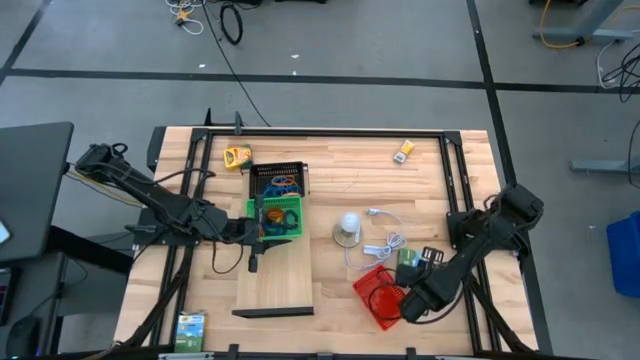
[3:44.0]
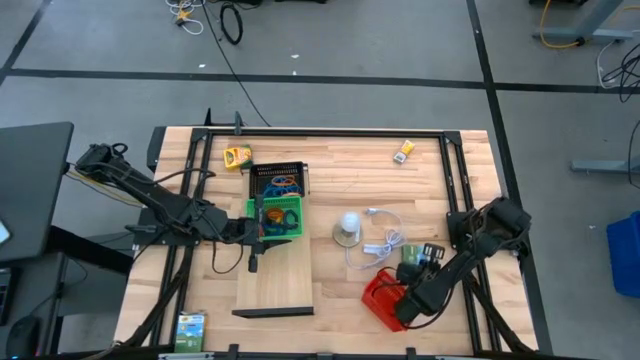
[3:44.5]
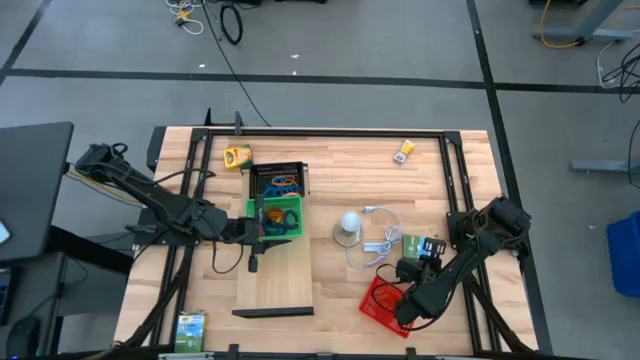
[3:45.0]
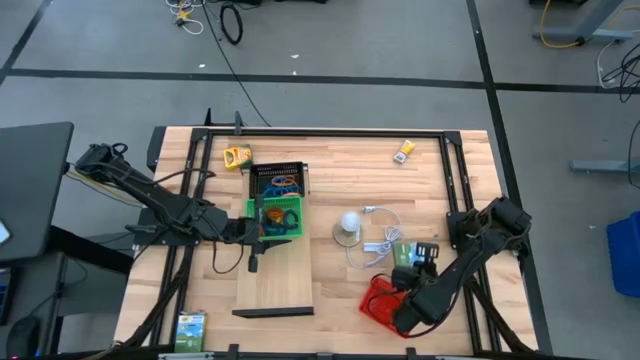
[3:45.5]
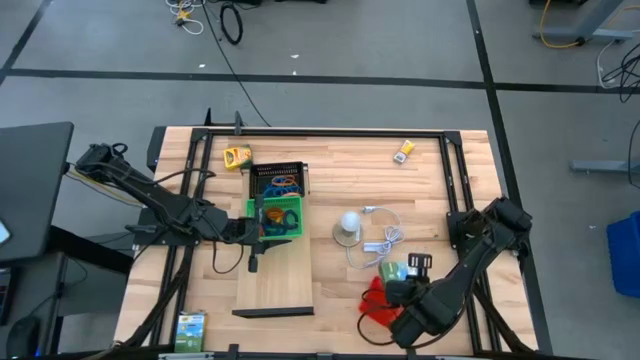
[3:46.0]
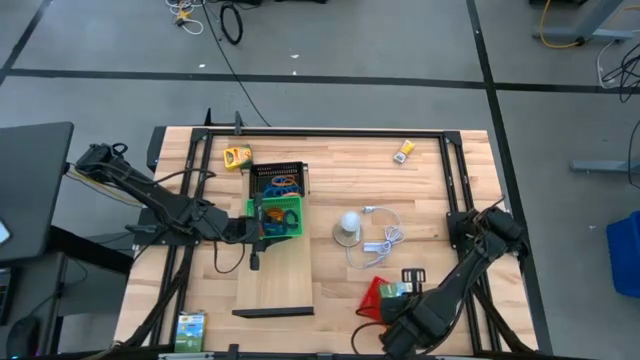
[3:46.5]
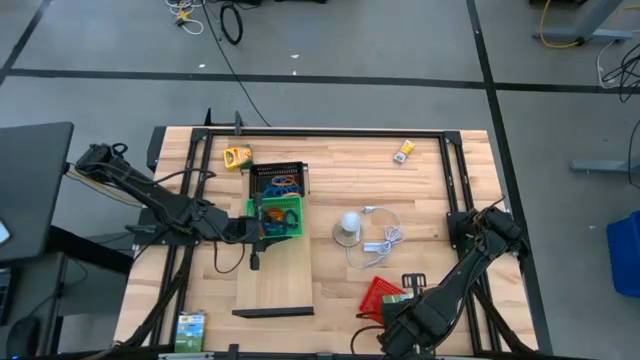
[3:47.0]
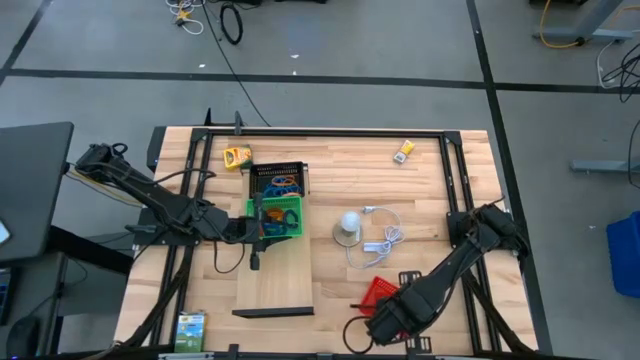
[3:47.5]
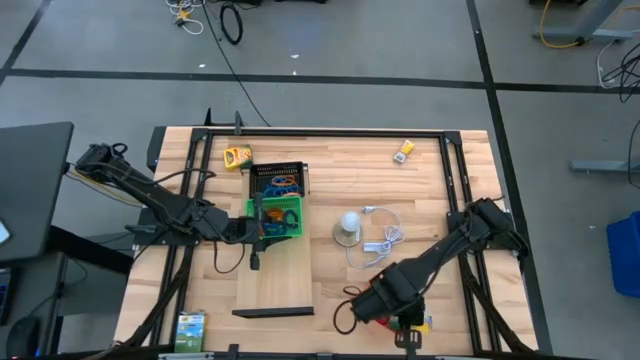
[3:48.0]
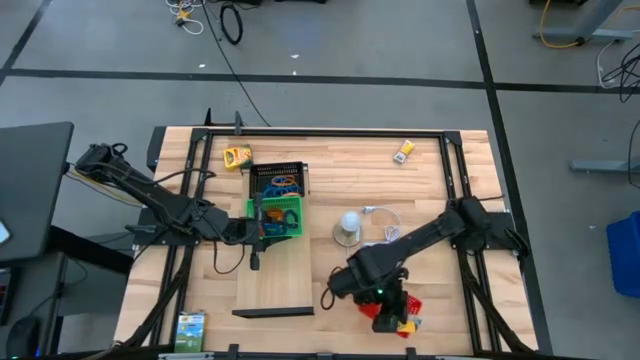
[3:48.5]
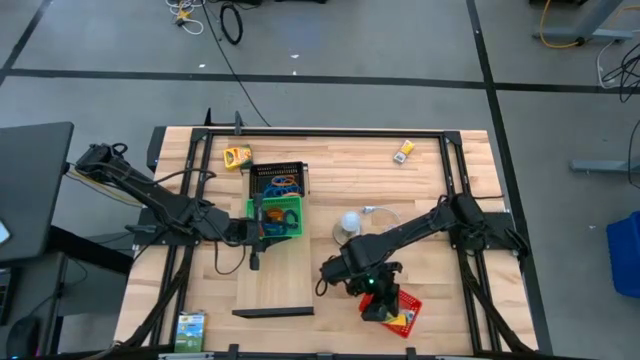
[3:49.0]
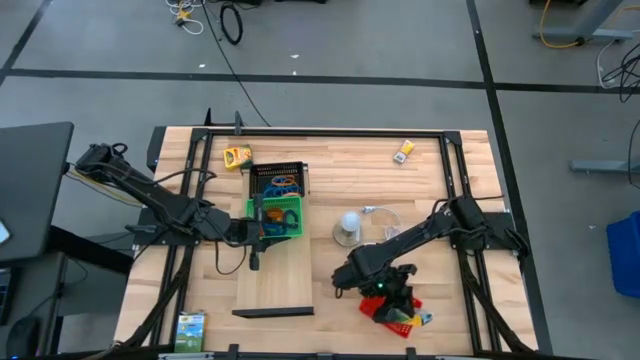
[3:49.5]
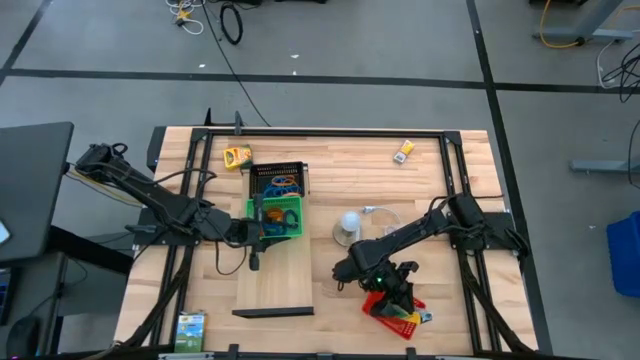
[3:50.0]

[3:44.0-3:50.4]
Task: Pick & Place Office Desk Supplies
Put the box of crayon into the red bin

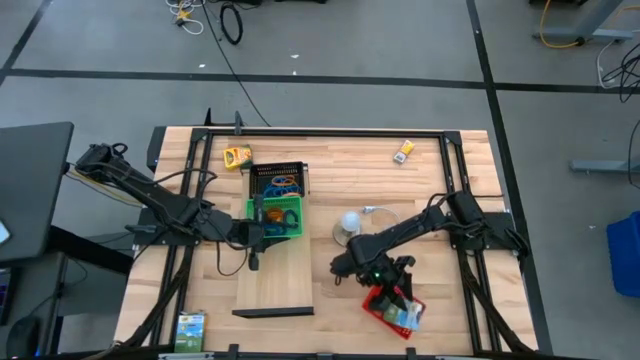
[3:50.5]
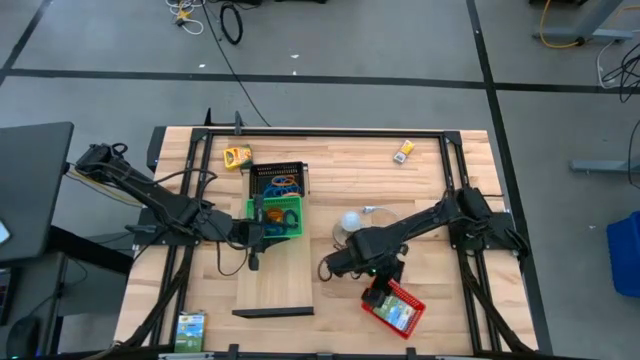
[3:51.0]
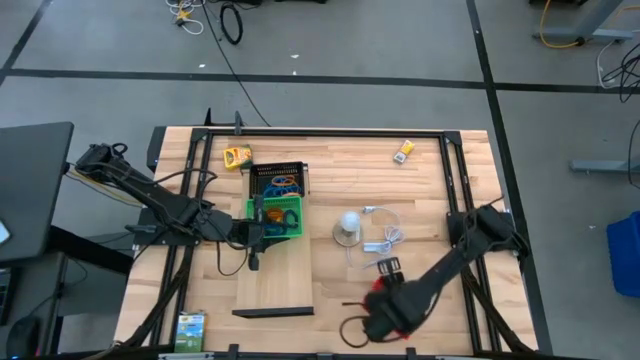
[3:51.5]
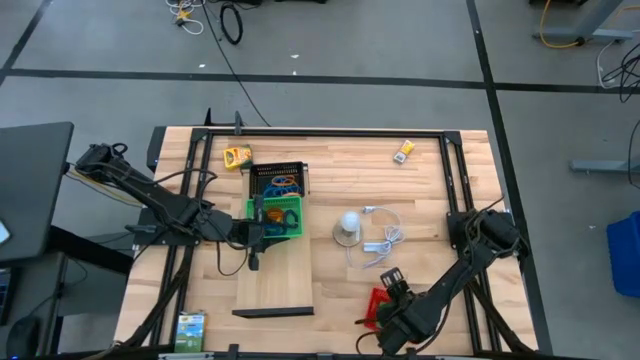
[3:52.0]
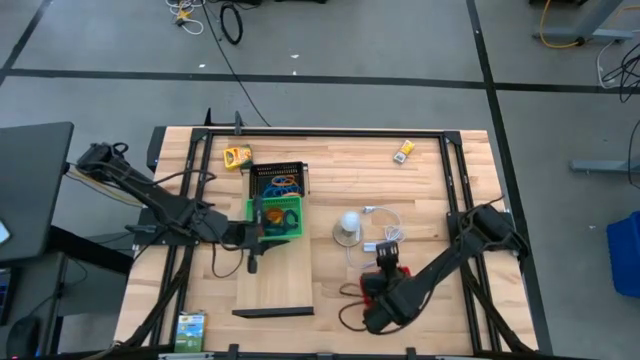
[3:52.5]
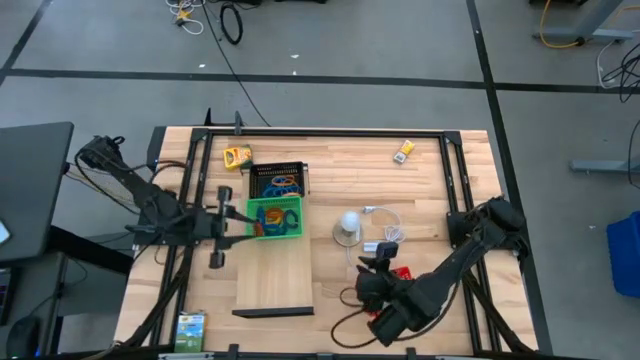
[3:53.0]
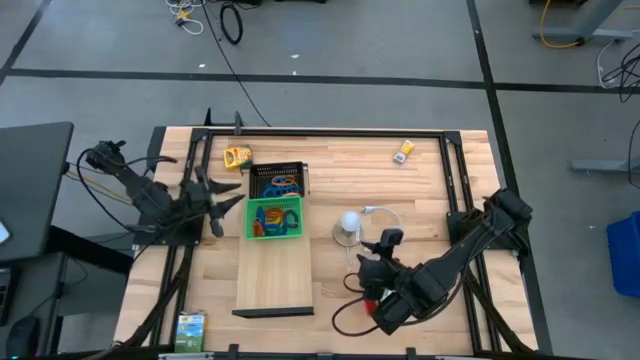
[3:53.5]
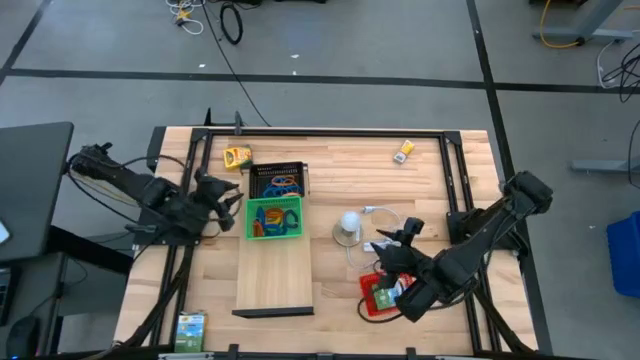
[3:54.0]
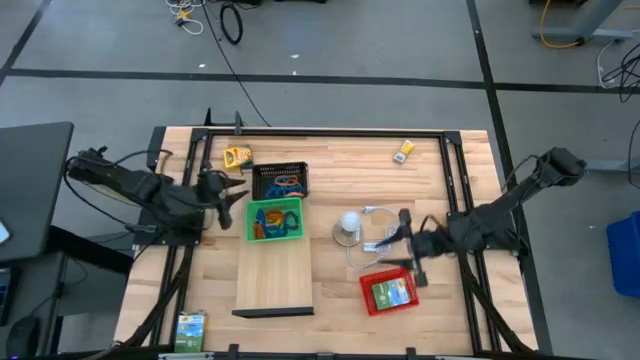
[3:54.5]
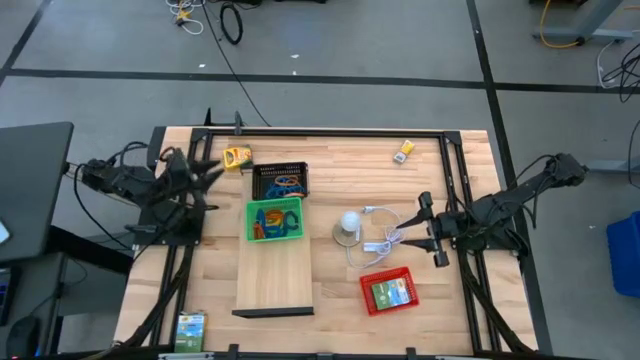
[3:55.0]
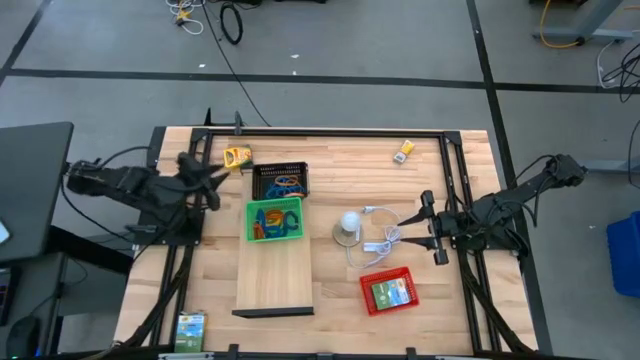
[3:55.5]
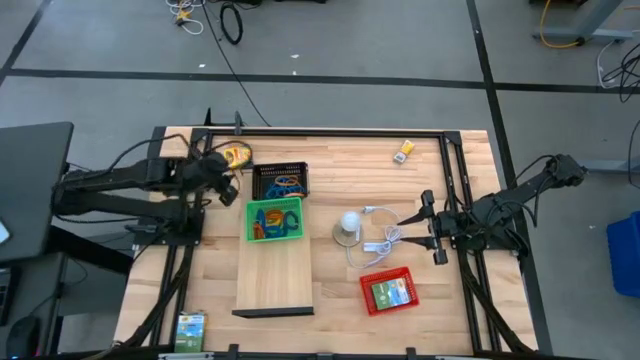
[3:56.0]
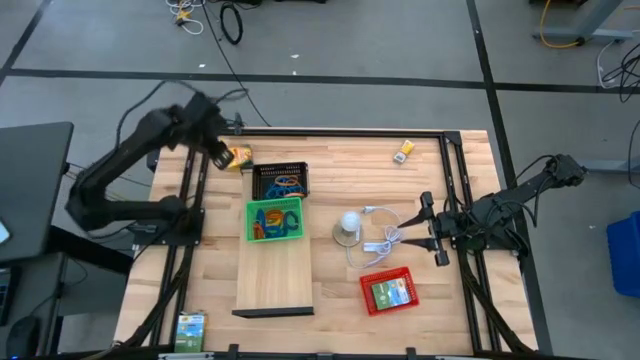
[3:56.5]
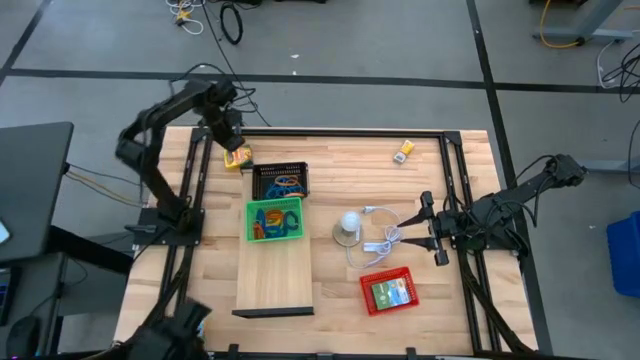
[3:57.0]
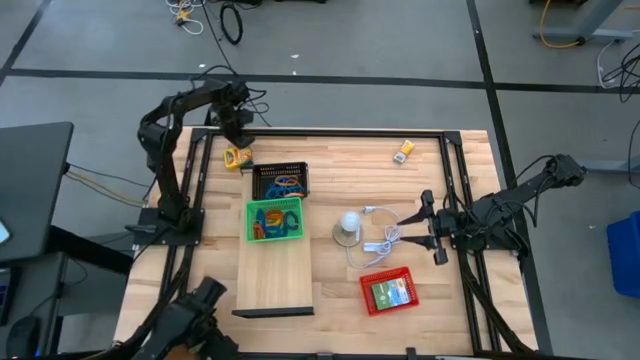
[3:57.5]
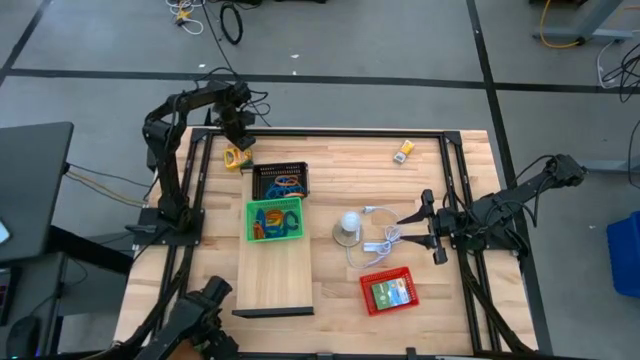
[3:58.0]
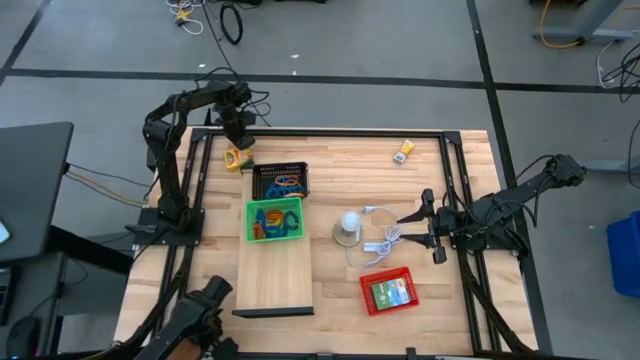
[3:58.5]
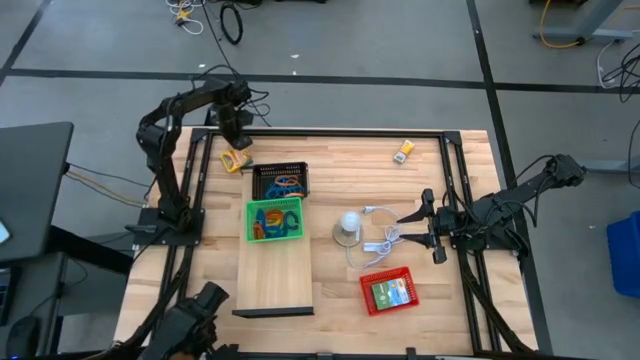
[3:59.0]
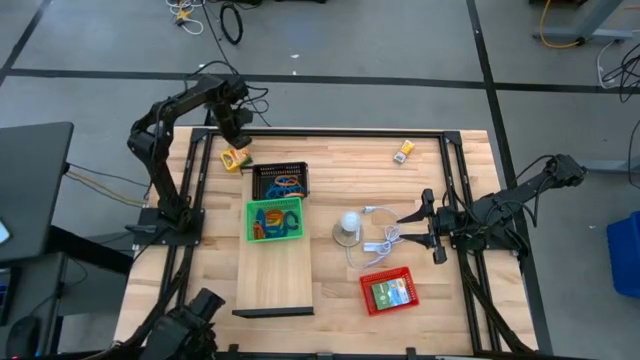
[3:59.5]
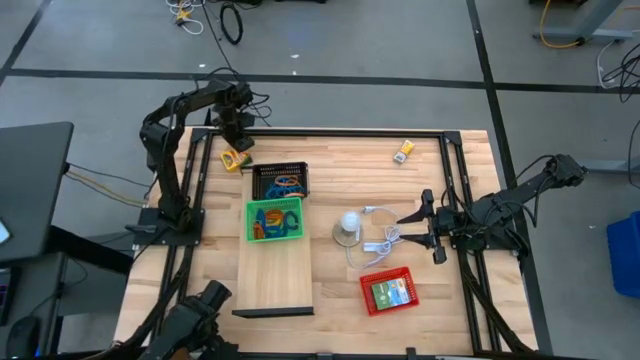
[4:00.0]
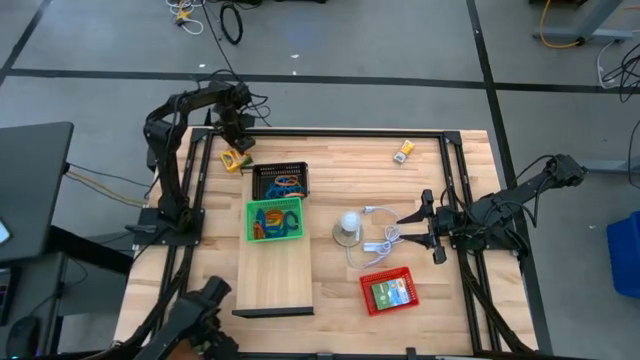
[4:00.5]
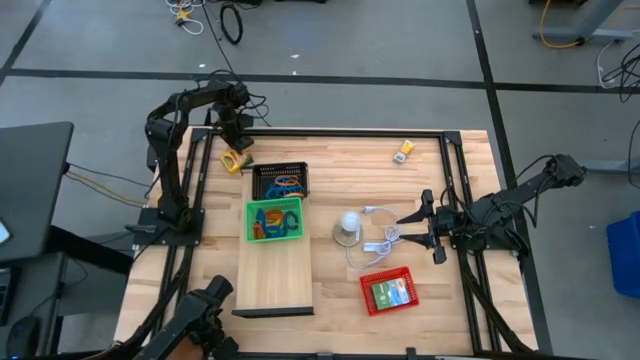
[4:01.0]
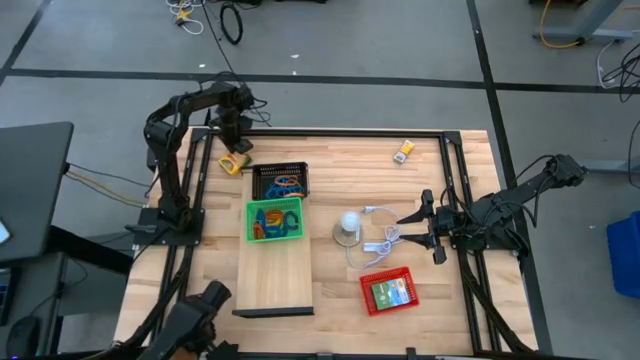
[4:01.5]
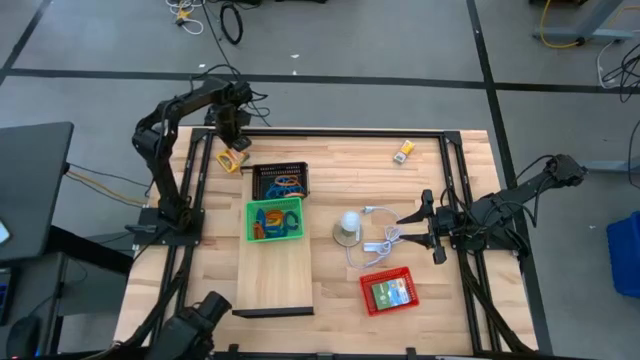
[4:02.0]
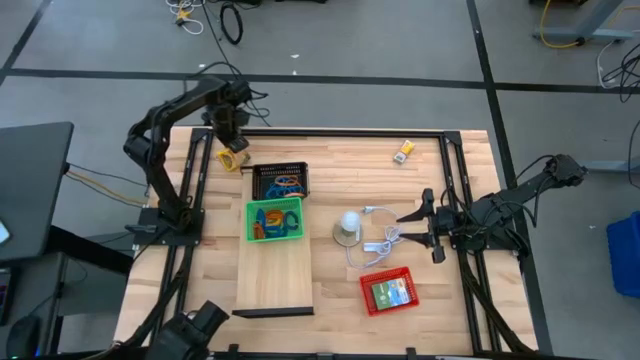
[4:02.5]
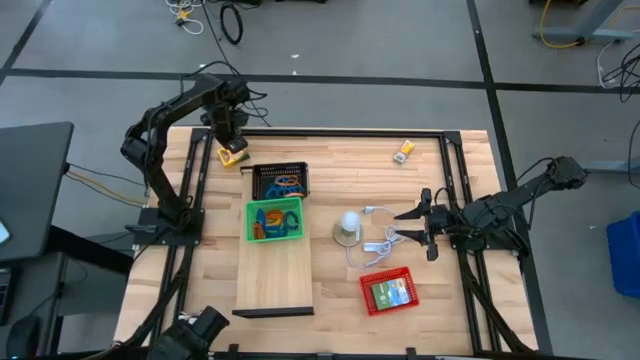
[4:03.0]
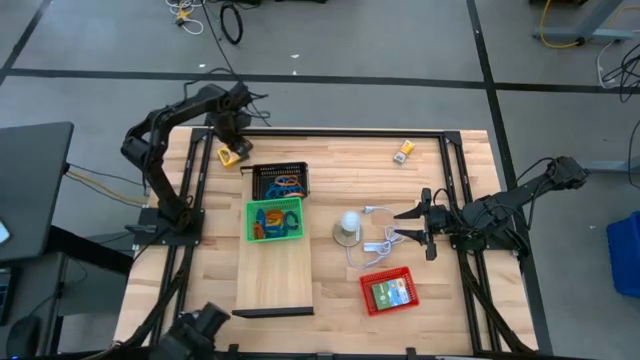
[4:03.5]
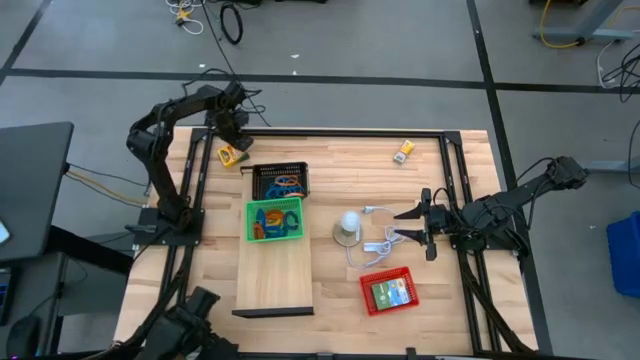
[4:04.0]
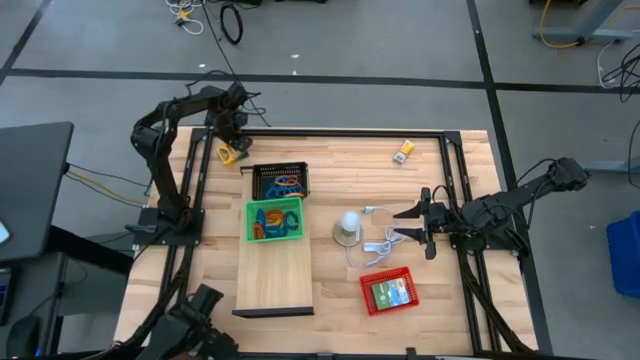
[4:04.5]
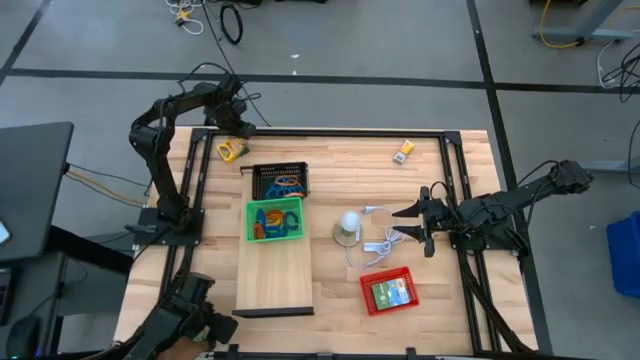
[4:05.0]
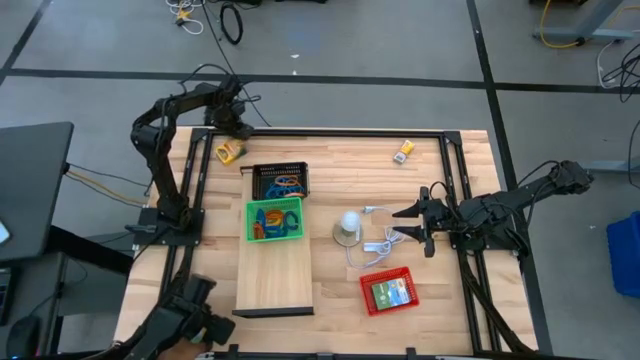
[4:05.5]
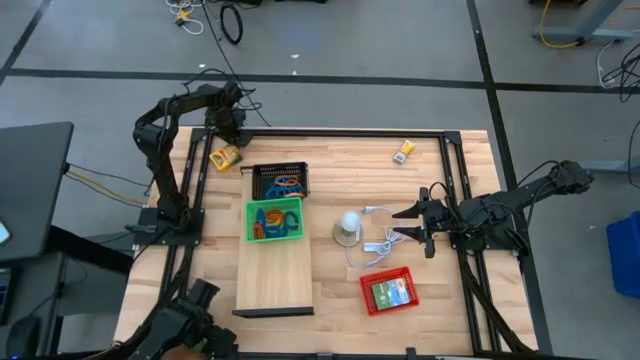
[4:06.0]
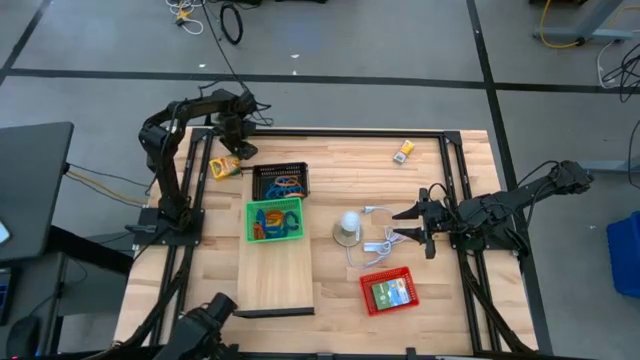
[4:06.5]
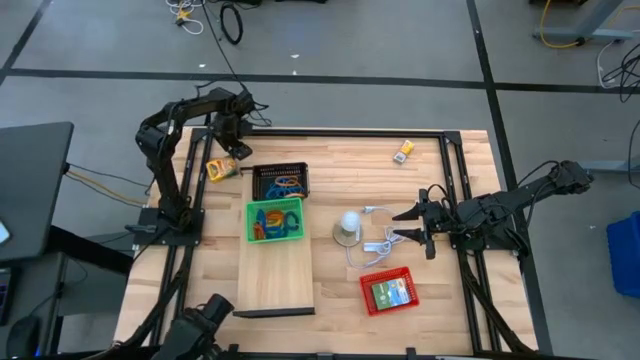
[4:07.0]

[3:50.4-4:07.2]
Put the box of crayon into the red bin
